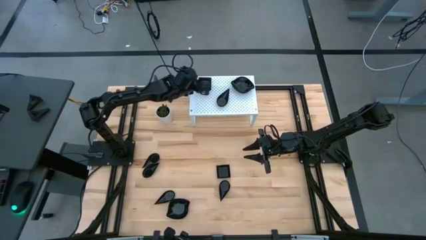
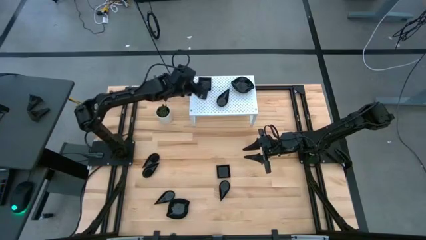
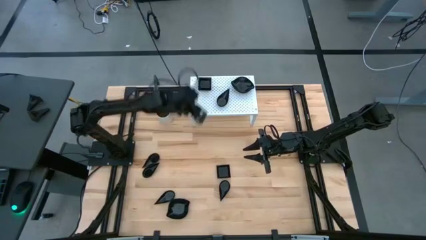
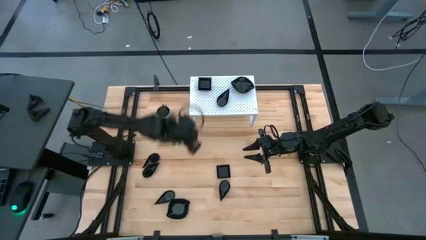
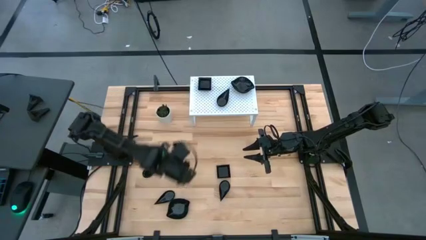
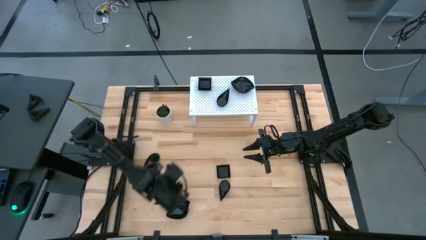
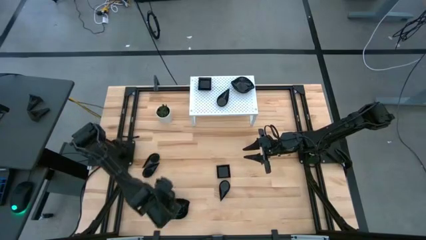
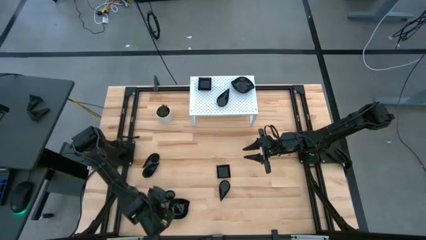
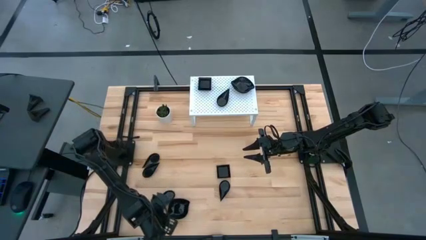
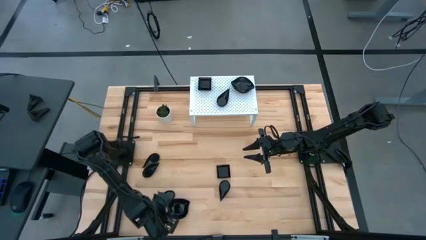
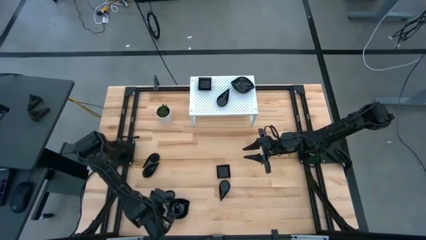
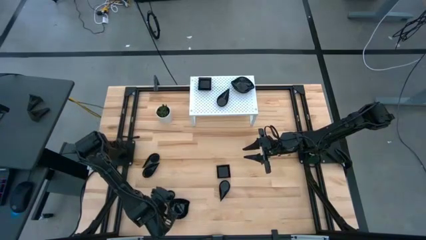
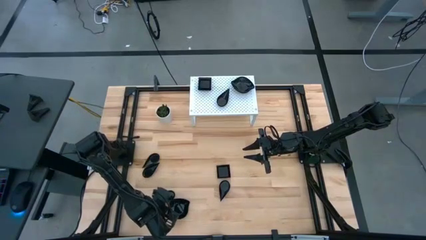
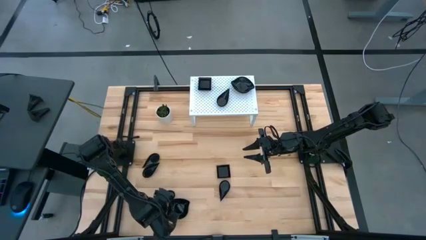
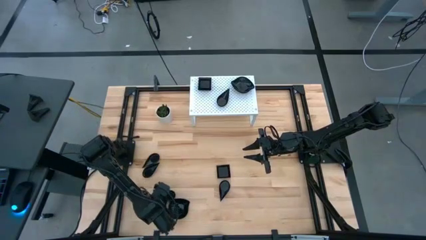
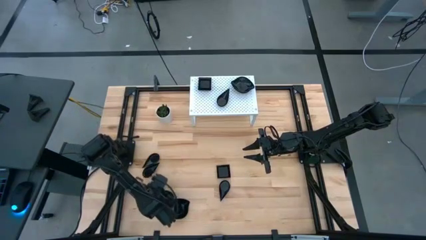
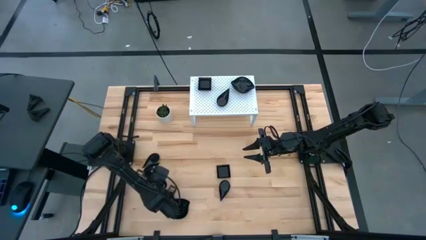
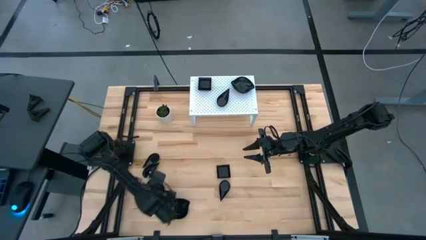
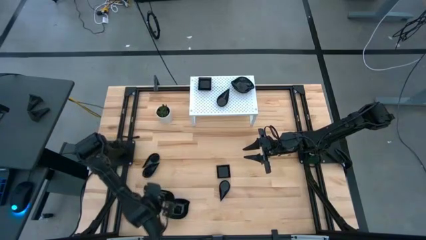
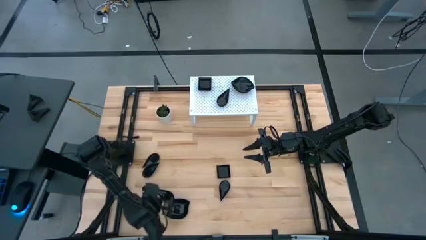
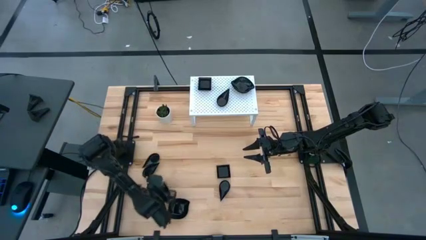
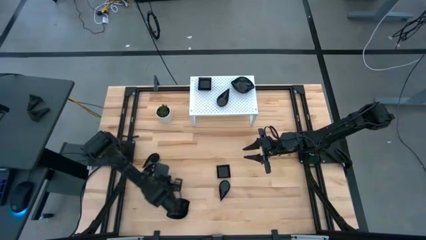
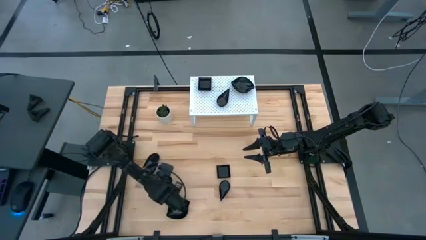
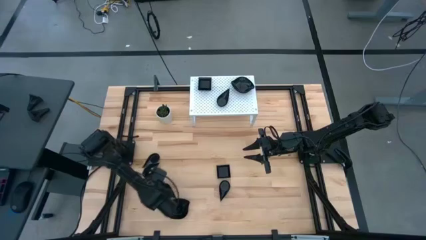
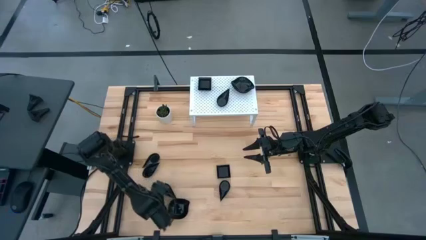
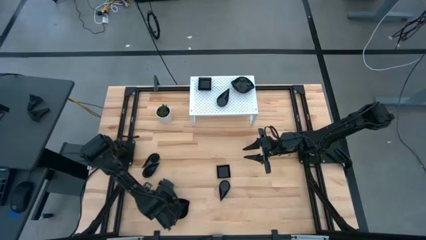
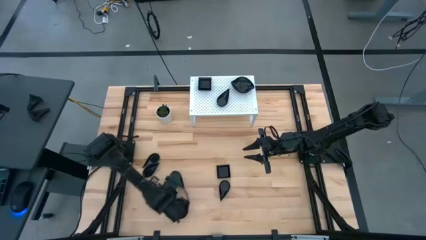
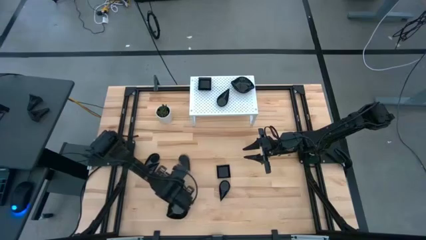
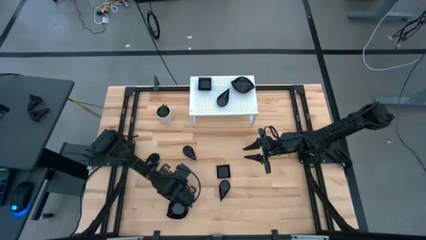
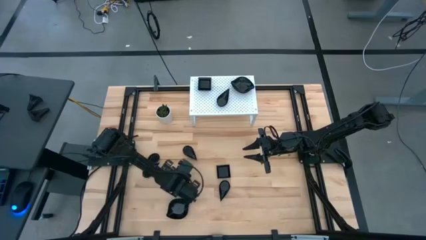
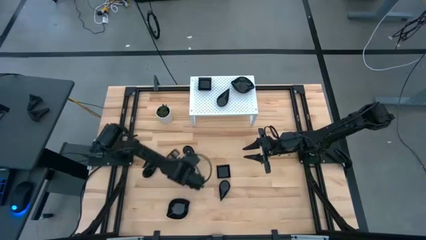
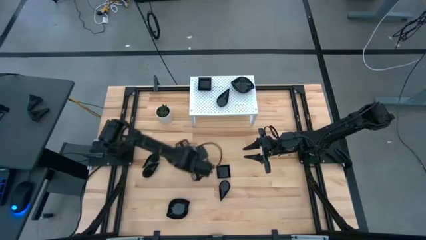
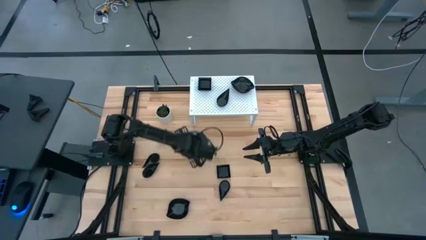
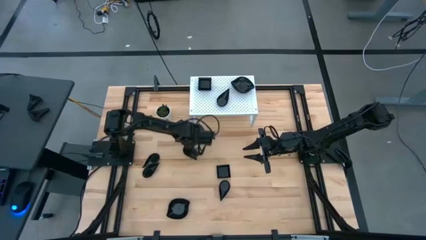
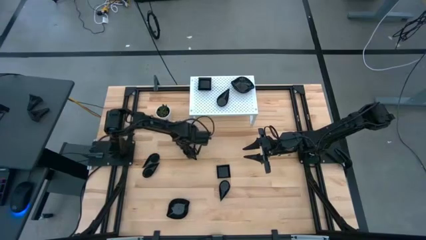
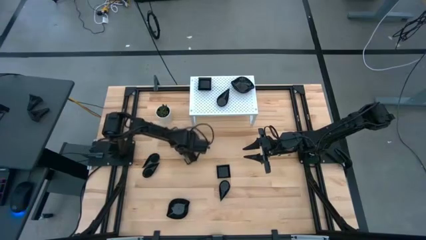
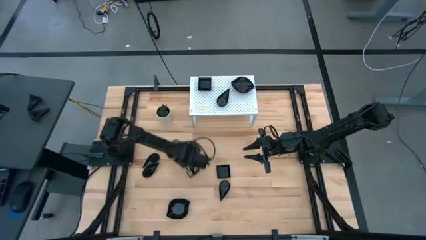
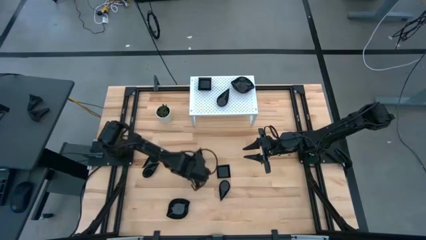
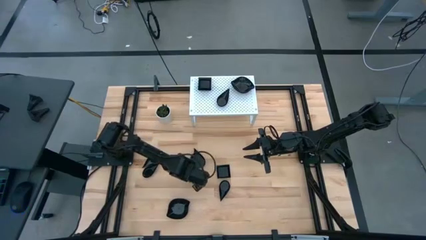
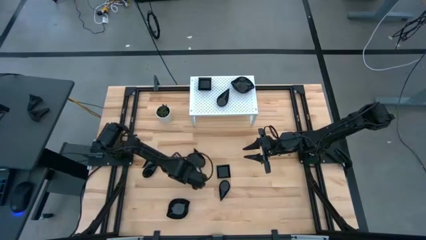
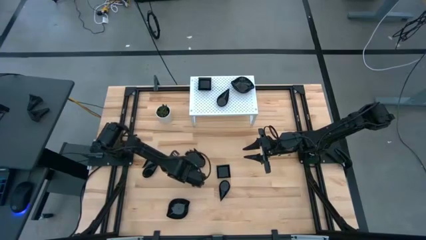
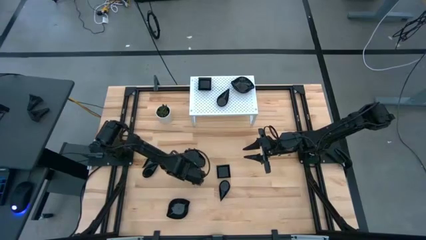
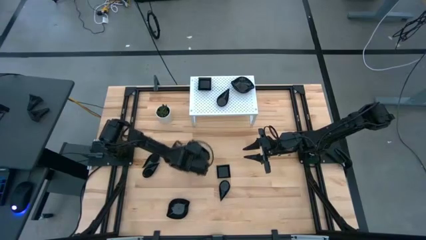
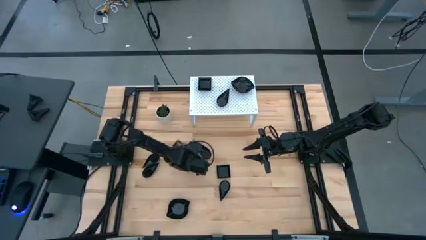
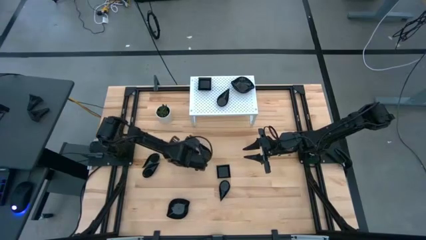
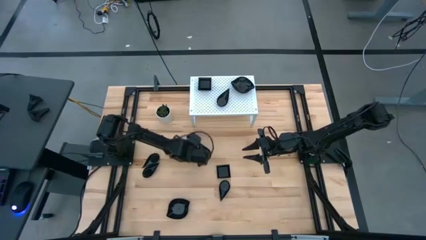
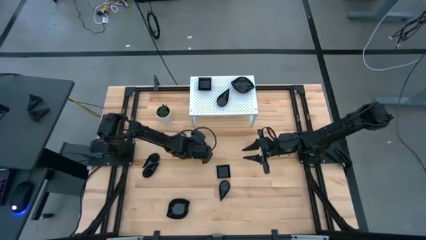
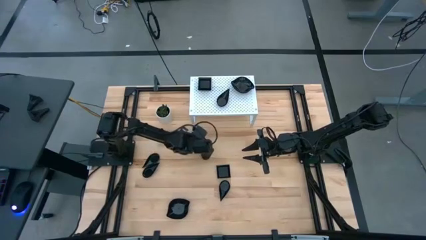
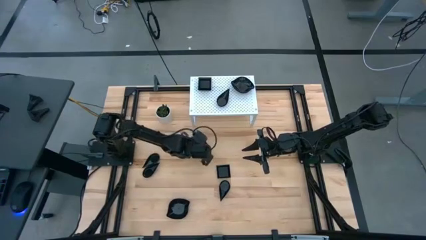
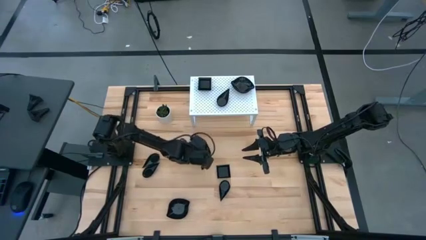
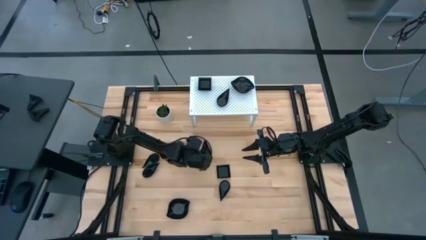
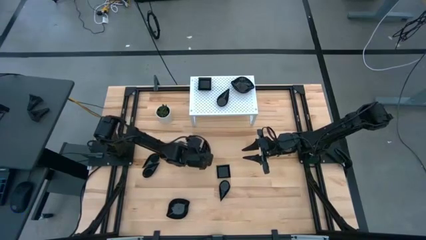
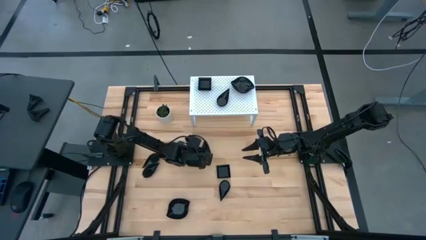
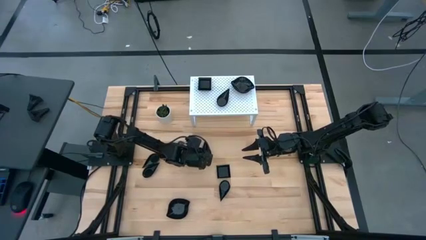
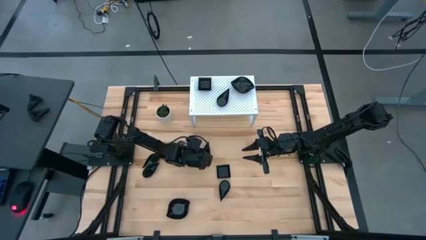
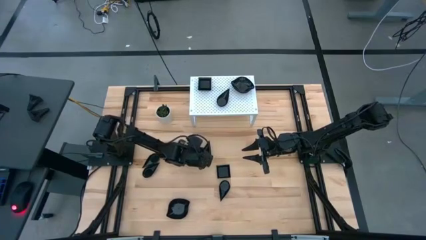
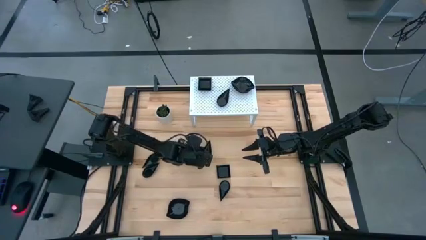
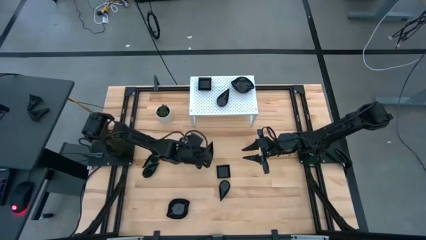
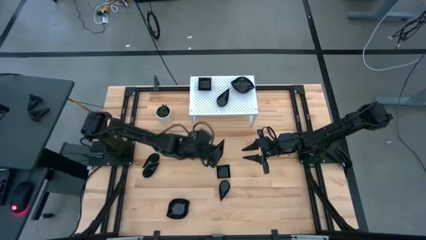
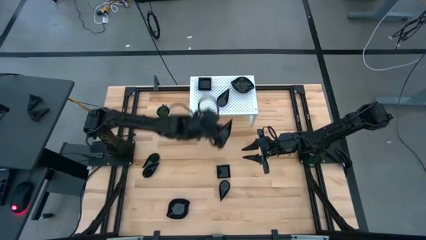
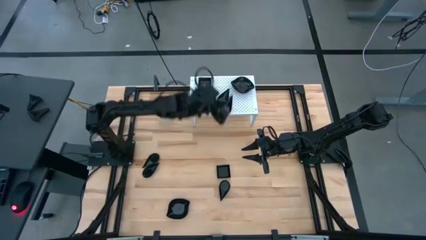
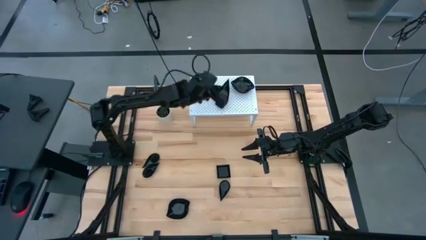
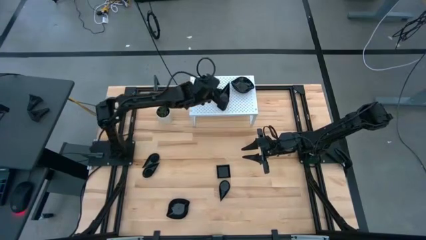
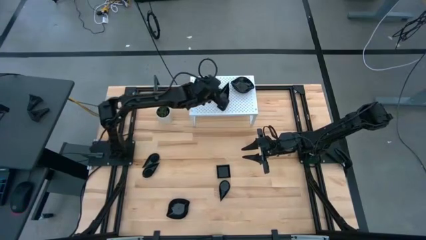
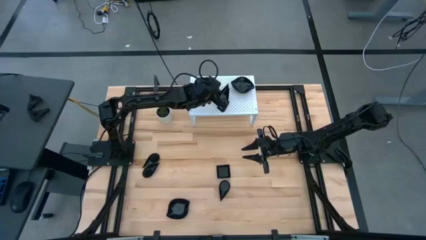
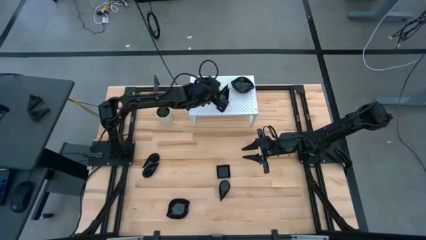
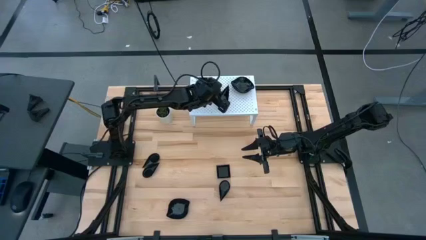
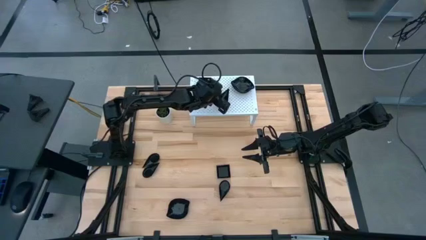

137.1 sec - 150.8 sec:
Task: Pick & Place Mini shaped plates
Stack the black plate on top of the black plate on the shelf

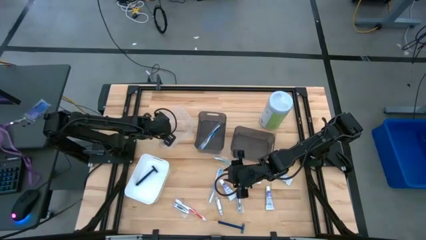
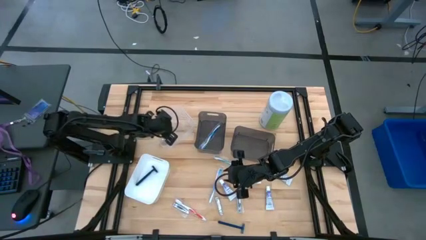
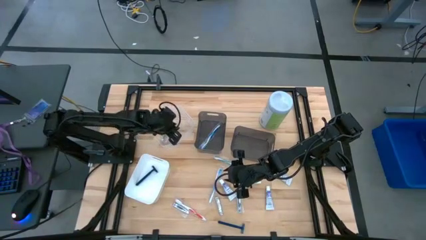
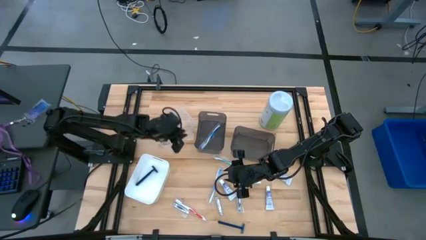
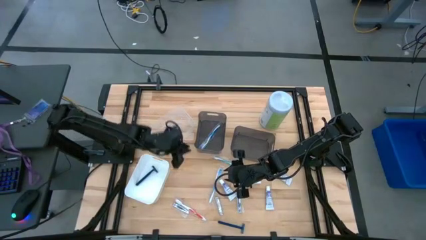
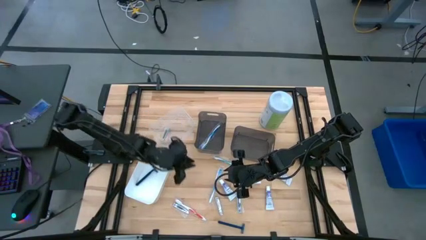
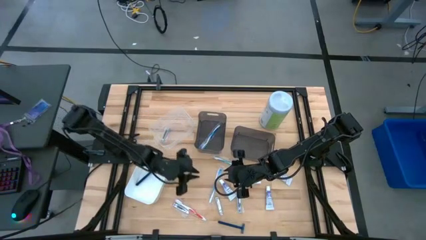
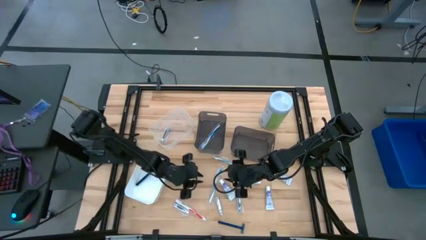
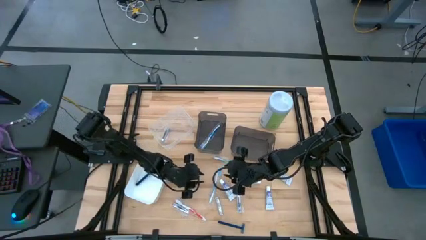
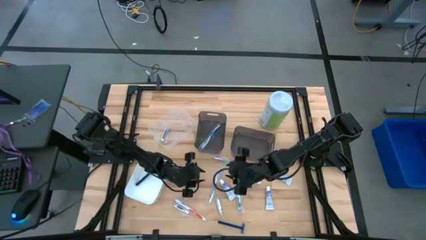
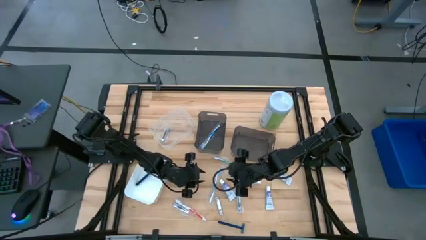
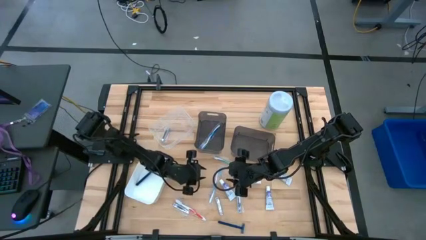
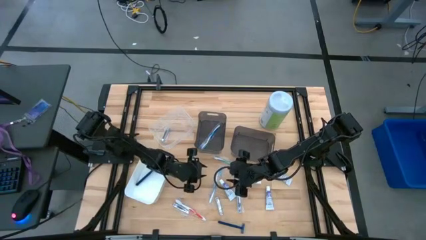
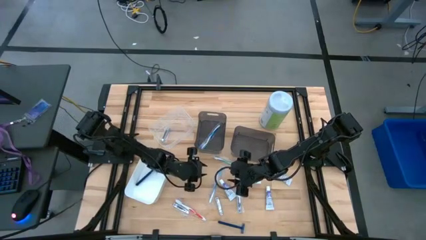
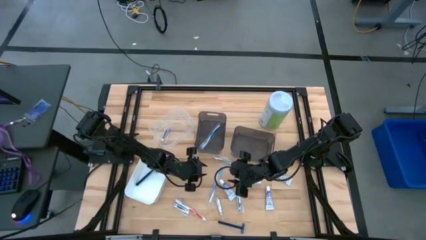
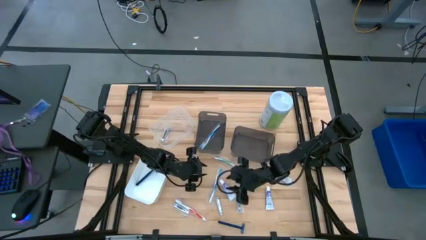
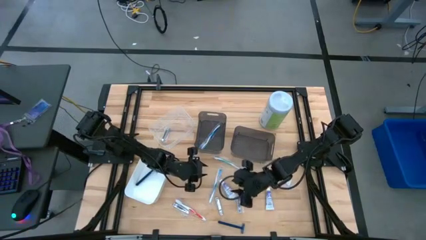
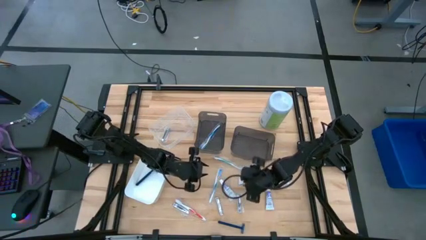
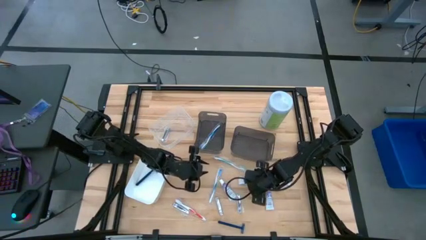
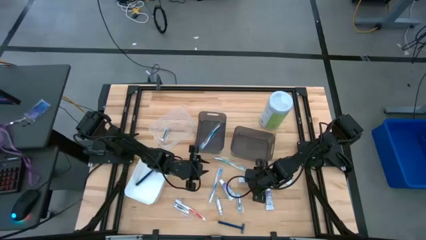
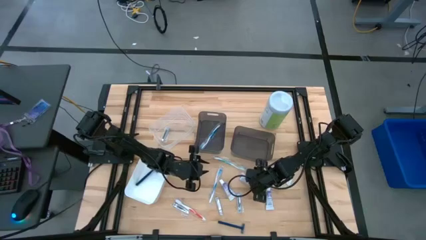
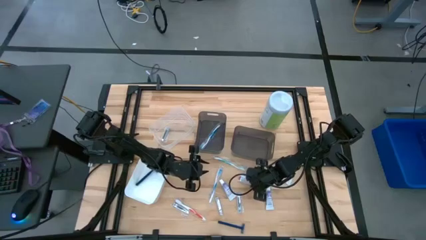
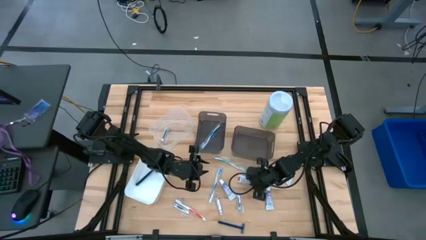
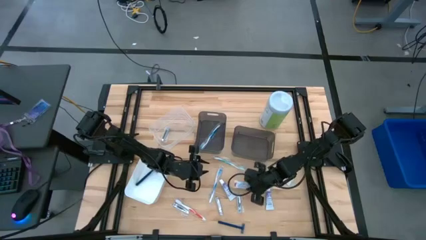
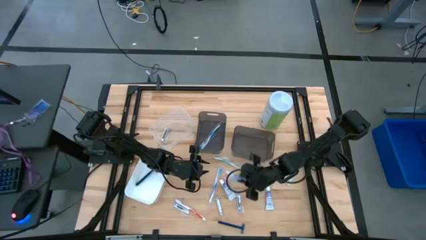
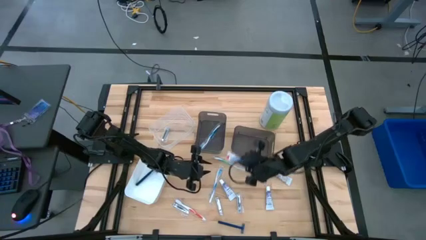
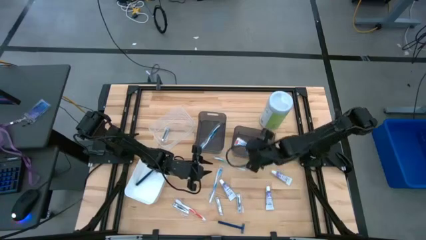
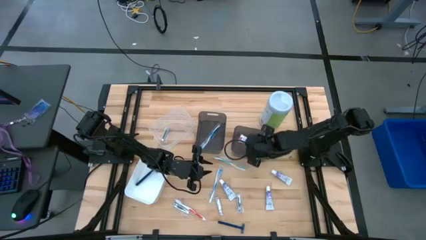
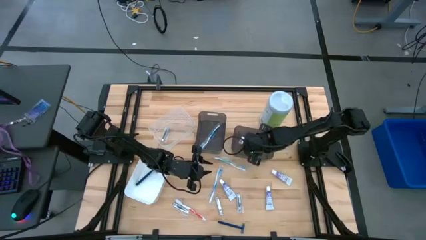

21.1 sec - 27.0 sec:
Task: Pick & Place Travel size toiletries
Put the white toothpaste into the right black bin
